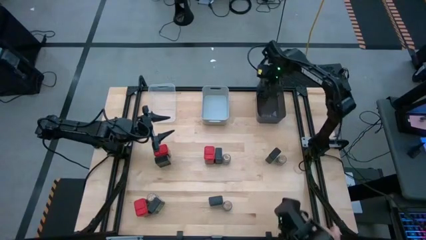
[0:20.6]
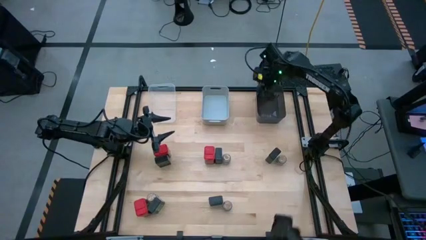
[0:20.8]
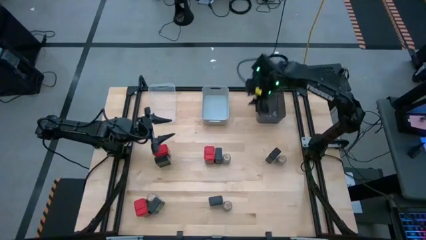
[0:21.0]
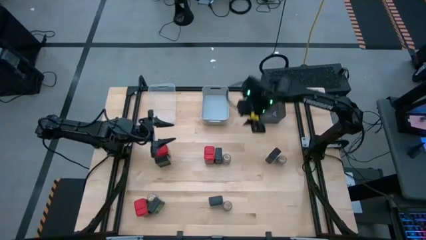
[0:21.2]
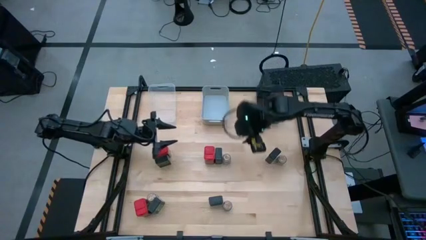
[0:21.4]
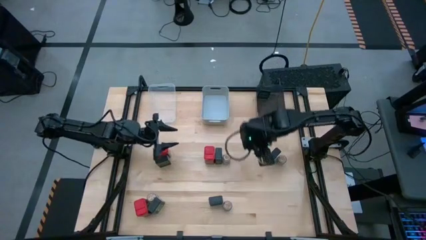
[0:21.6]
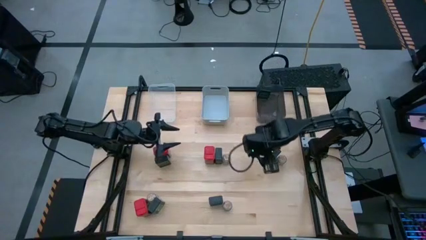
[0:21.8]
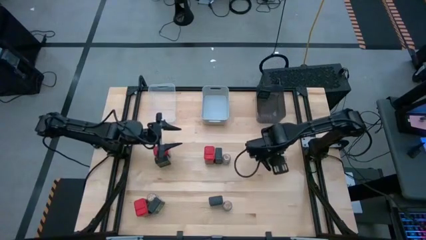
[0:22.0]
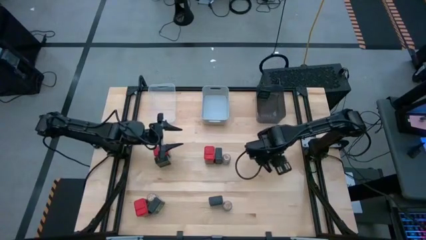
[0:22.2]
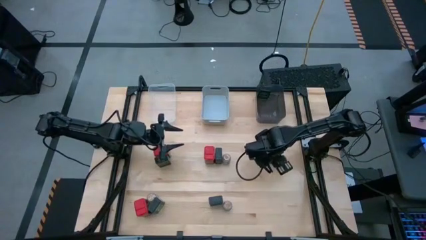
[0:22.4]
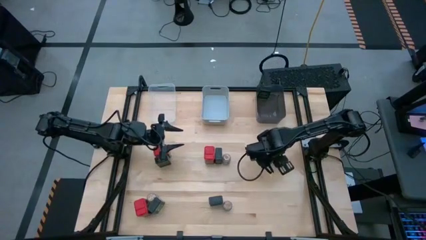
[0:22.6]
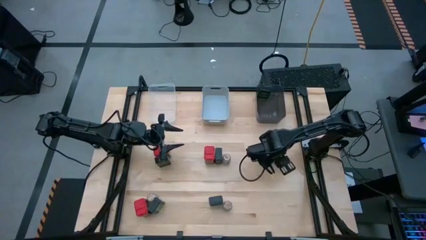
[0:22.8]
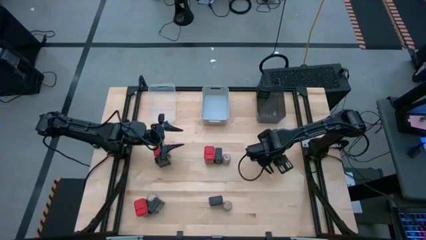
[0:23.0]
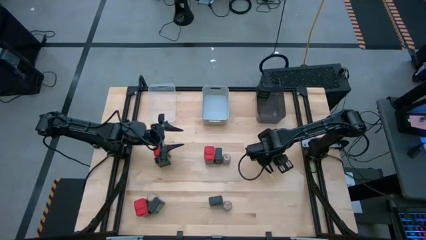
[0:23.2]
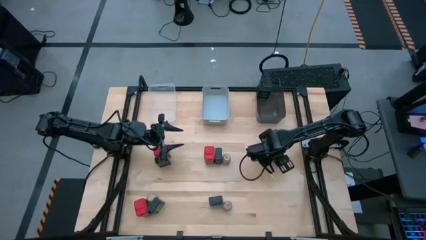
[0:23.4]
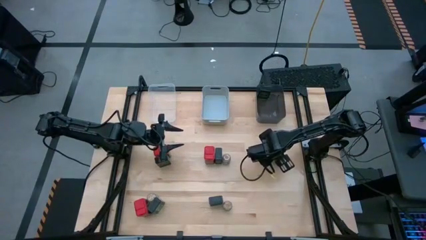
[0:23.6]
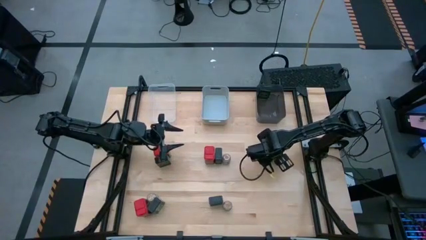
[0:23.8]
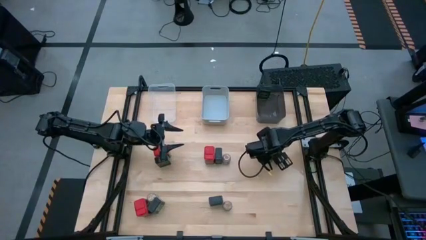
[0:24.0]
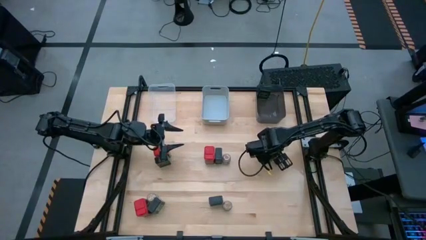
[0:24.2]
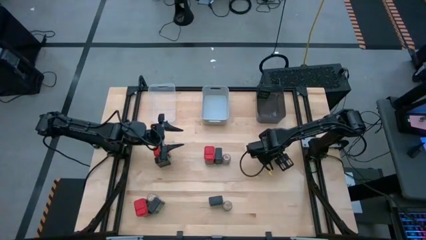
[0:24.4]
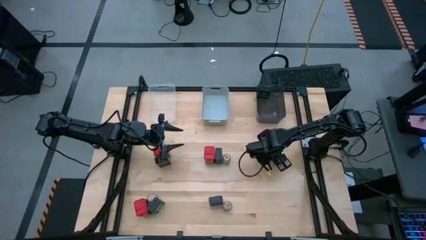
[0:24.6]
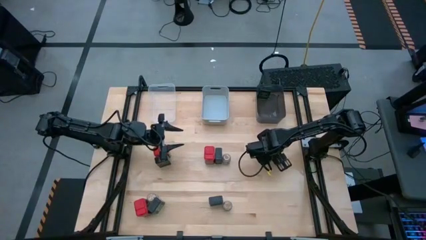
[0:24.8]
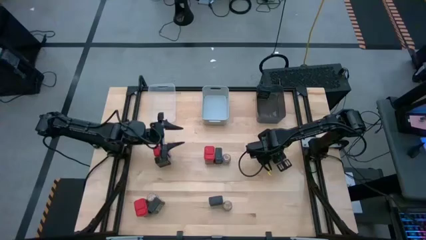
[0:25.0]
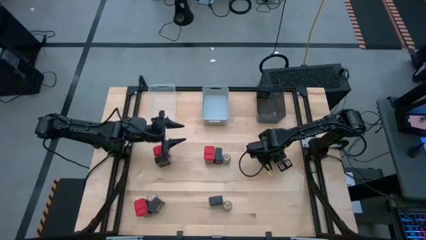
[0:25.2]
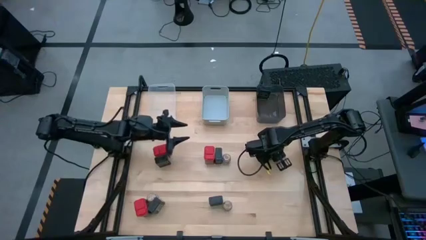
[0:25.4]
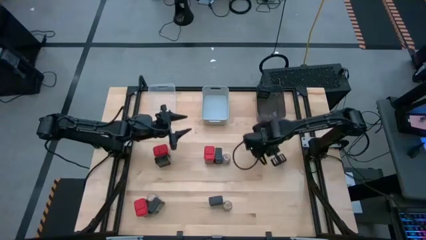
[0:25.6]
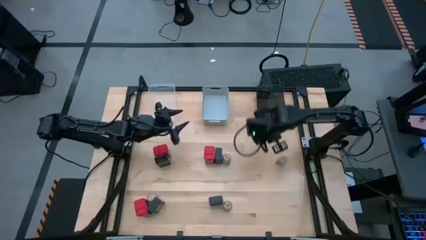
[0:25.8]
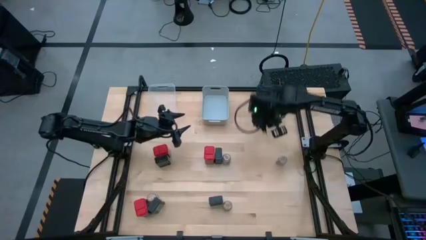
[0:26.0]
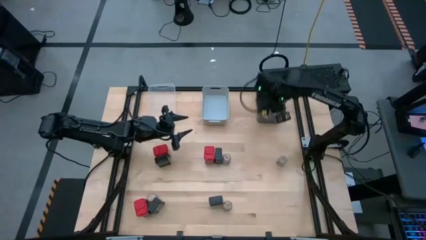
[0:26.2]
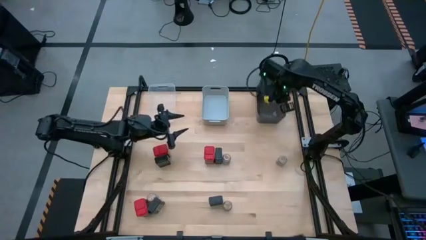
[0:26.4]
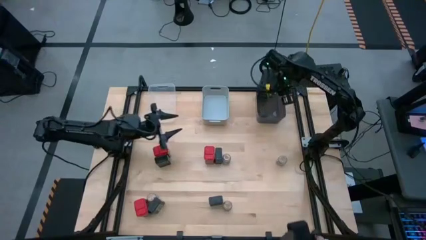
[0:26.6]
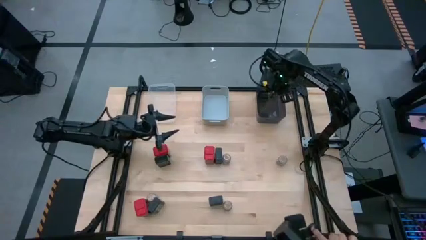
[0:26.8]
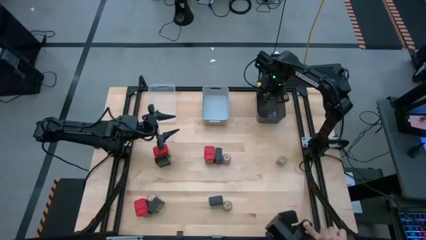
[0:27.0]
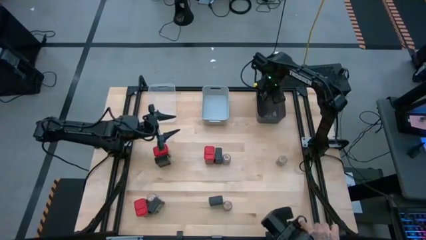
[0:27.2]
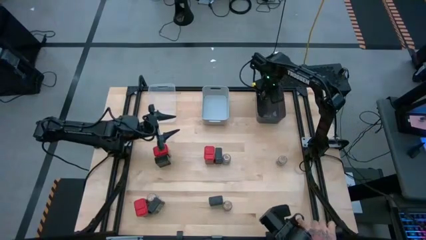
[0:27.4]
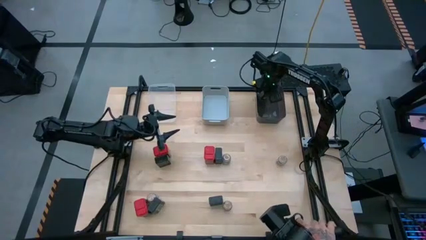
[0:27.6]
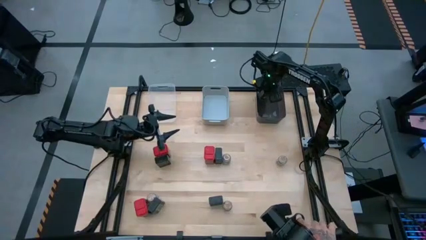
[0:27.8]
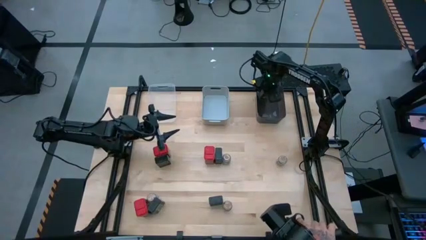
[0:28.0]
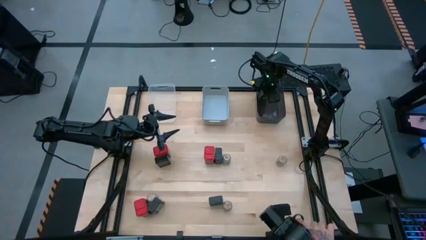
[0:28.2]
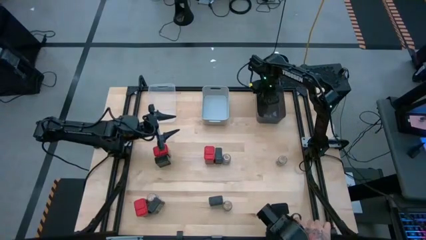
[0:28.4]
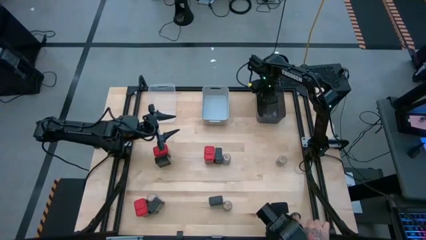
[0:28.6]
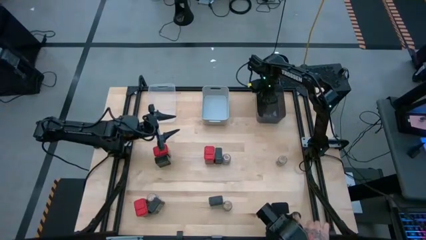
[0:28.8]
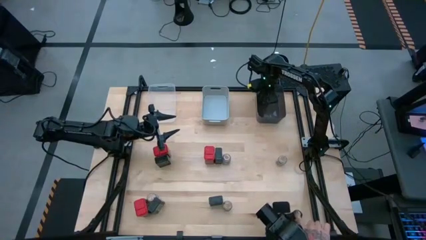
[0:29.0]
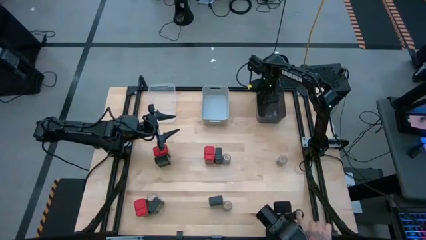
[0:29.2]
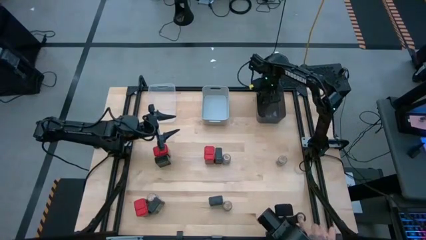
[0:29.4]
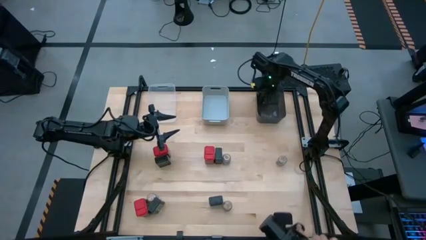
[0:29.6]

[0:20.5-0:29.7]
Task: Sort spices by type
Put the green seasoning can into the black bin

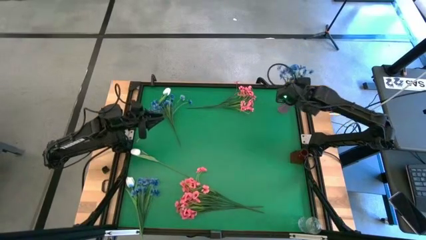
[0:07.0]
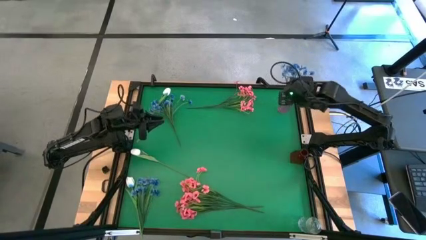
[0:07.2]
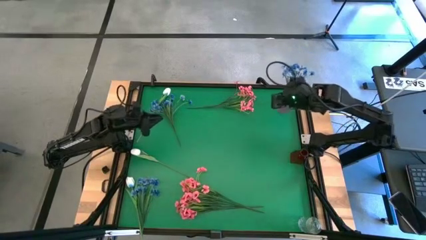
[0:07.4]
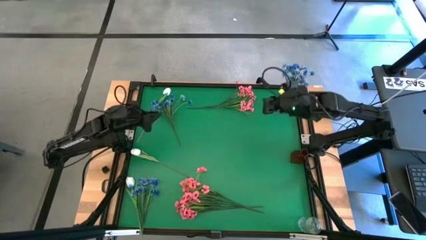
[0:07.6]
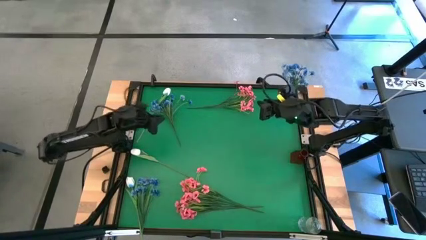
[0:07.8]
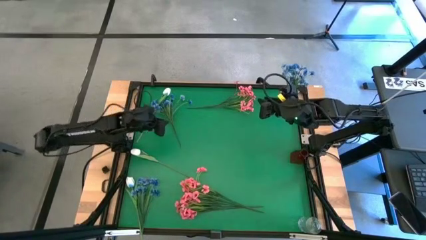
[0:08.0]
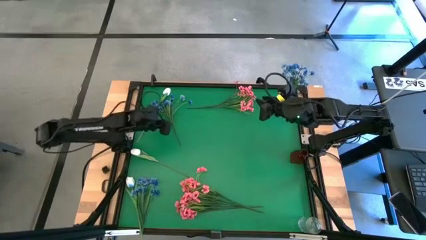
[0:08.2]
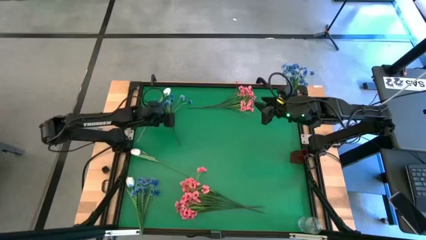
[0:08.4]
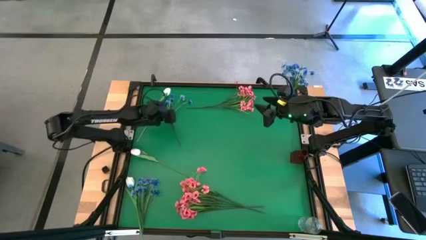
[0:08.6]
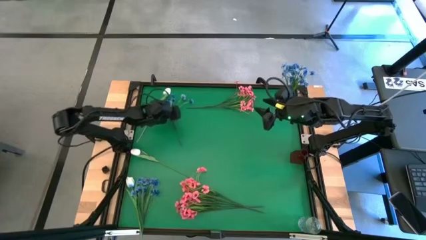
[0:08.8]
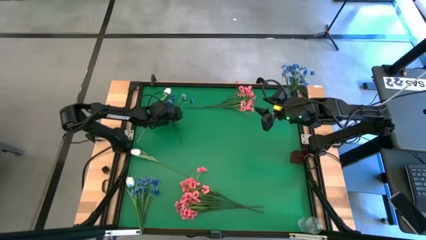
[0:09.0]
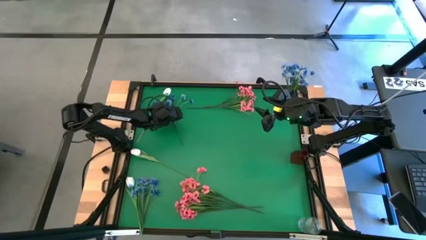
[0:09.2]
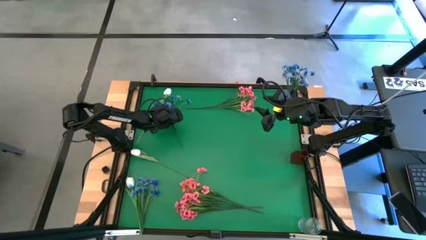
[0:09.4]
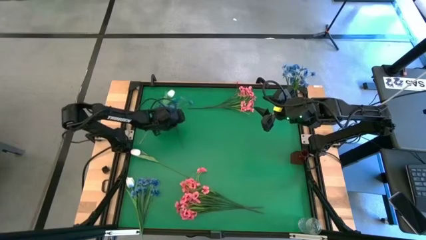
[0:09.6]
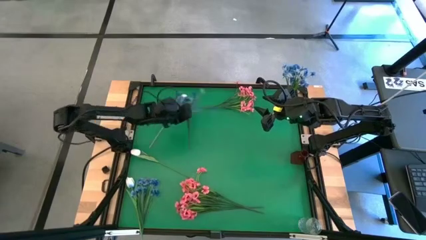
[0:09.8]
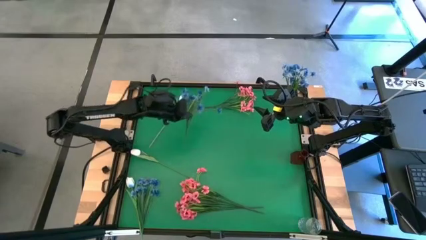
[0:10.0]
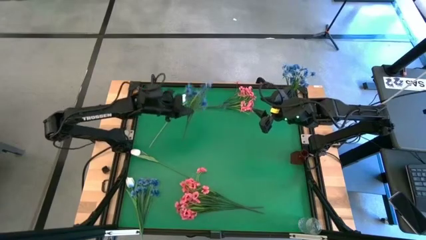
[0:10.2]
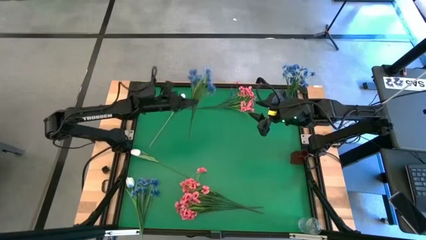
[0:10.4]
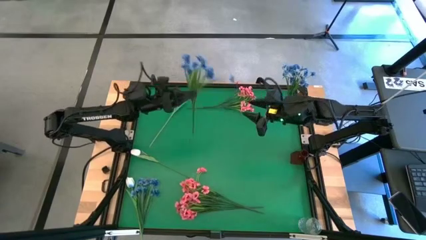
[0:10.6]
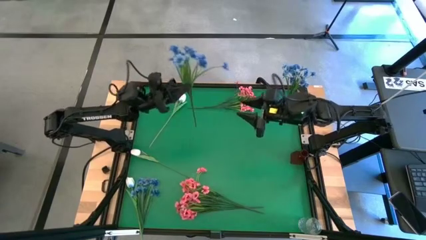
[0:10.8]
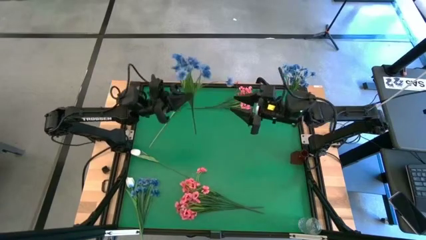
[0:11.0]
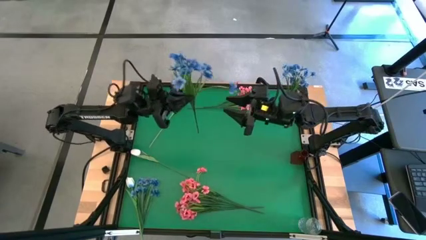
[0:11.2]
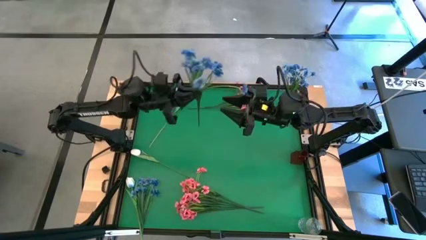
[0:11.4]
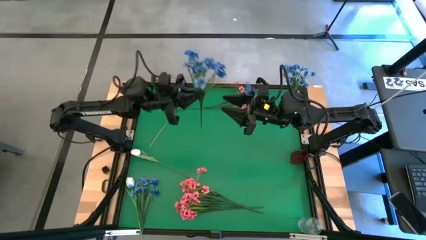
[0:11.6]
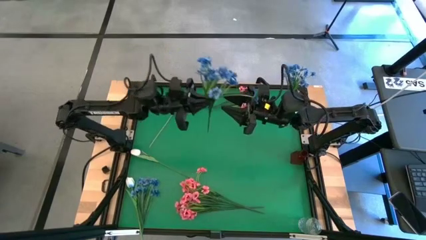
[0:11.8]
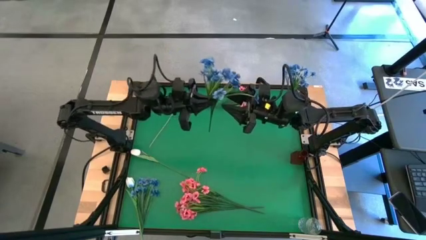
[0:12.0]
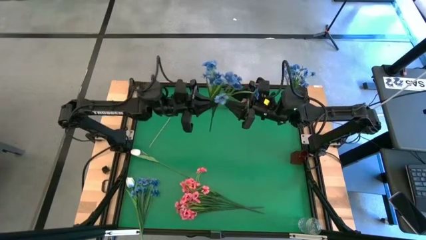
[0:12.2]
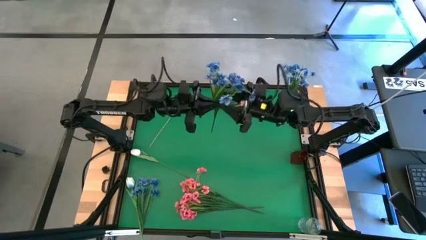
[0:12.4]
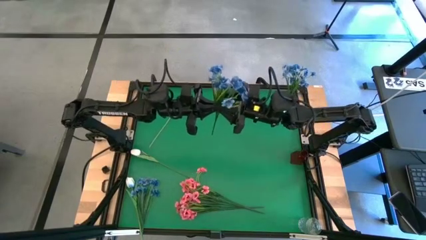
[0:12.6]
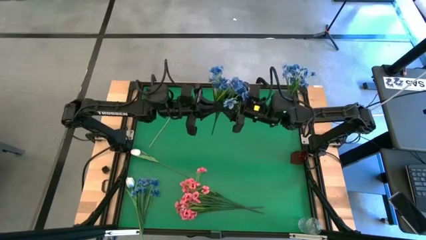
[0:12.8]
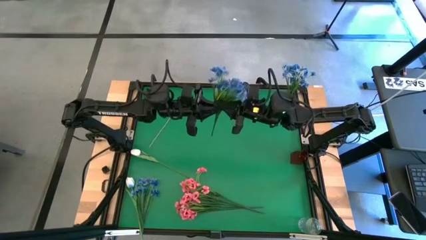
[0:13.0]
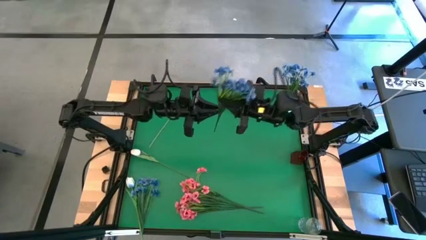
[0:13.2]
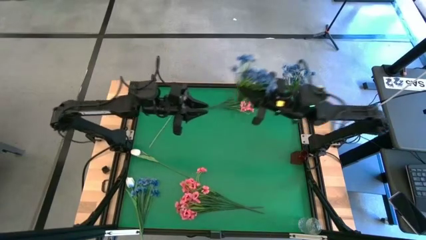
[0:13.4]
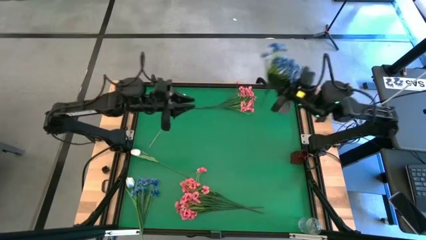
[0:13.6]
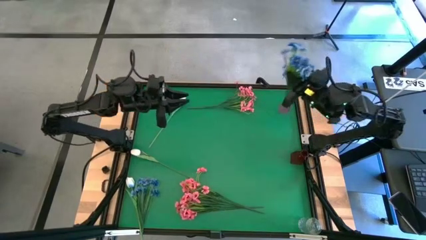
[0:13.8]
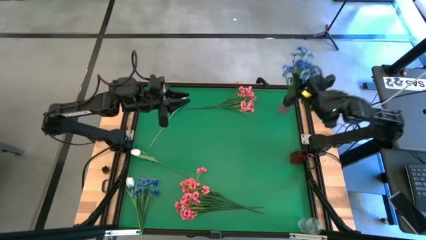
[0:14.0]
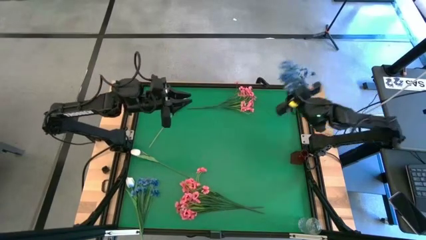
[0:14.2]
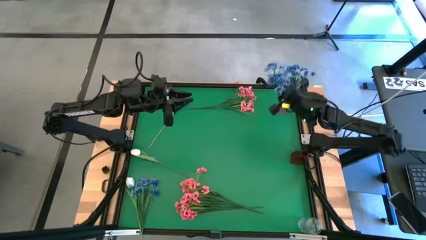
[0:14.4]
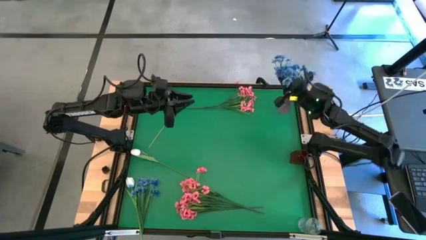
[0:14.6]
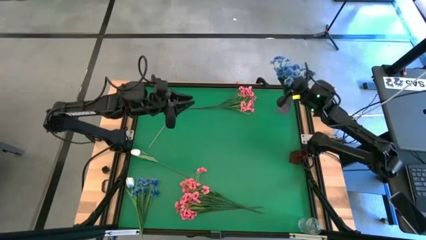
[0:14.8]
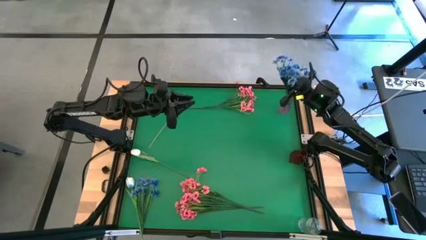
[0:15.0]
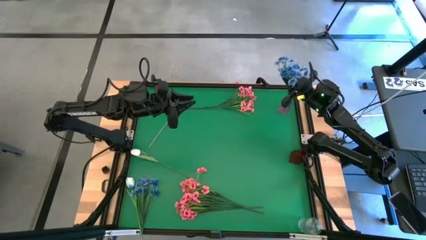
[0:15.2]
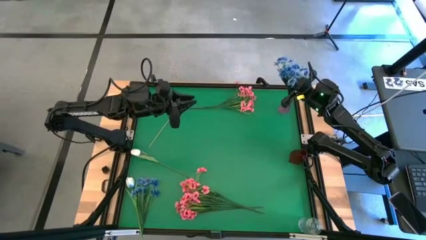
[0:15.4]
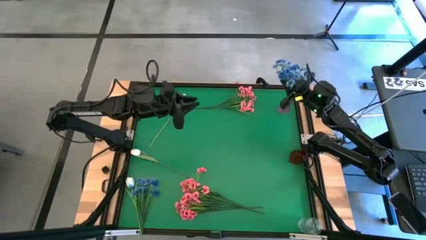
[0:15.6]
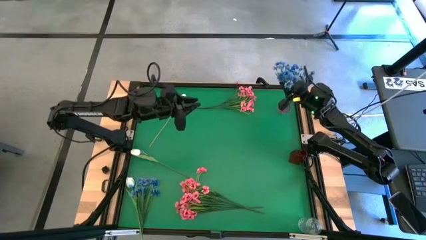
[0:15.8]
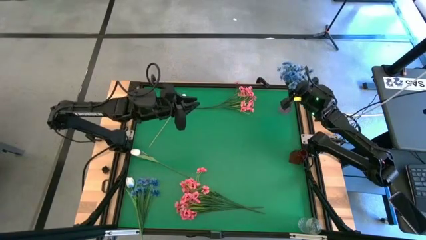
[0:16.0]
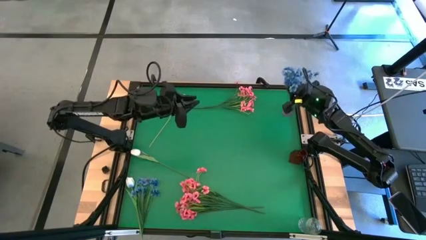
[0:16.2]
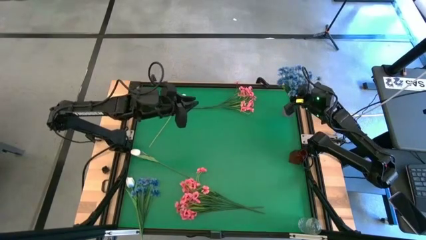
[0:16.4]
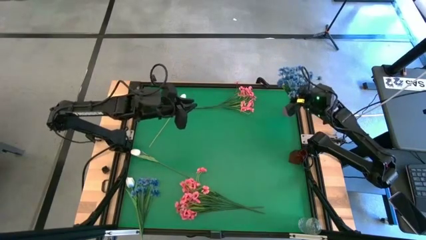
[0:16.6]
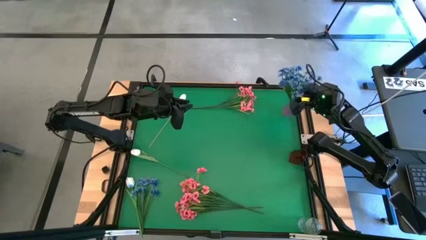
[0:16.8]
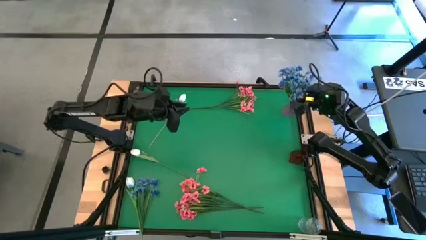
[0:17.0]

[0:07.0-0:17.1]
Task: Sort flowers into vase by color
Put the top blue flowers into the purple vase
